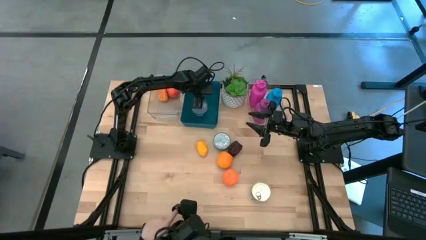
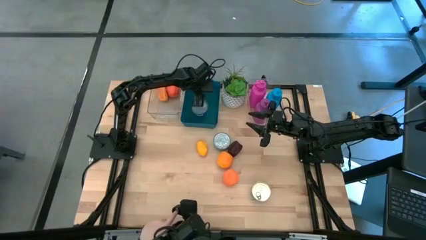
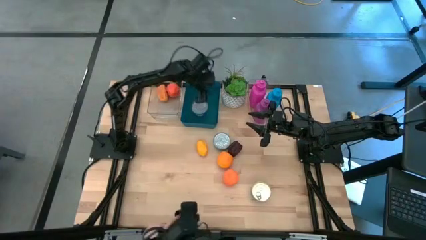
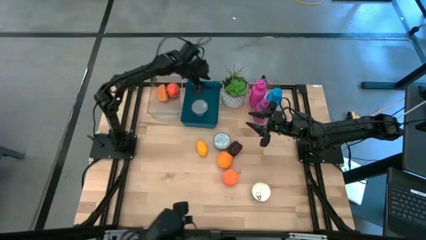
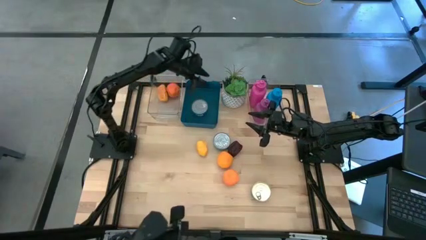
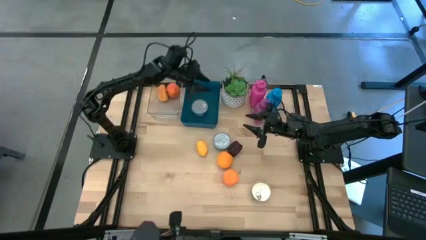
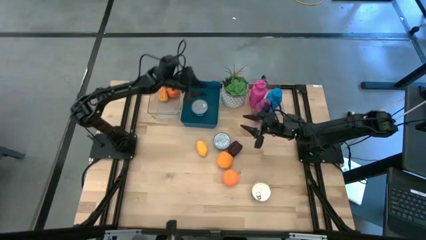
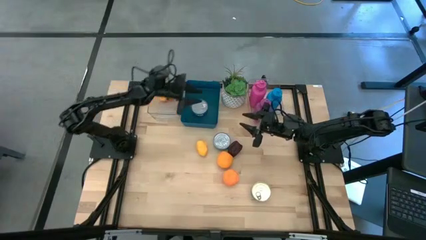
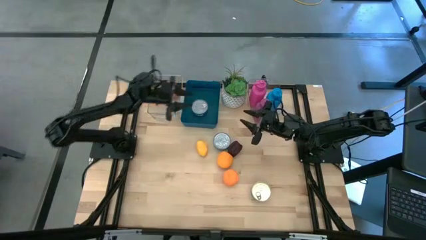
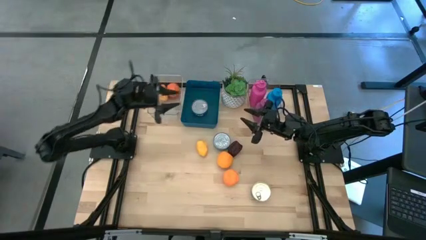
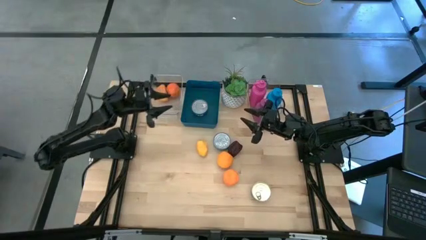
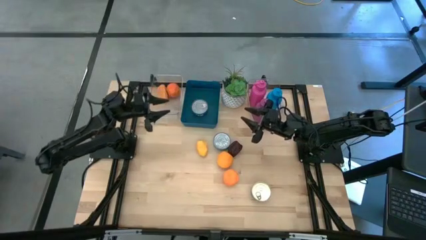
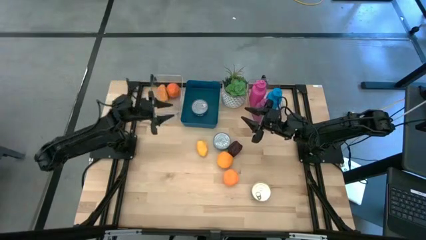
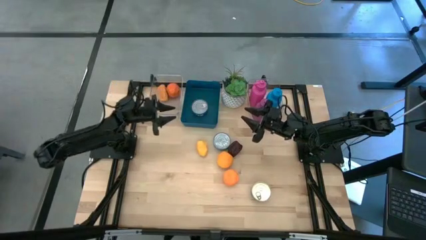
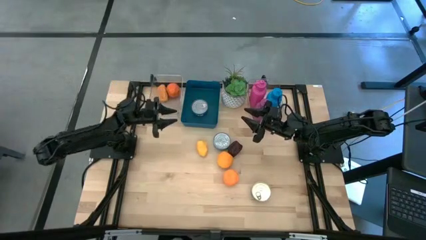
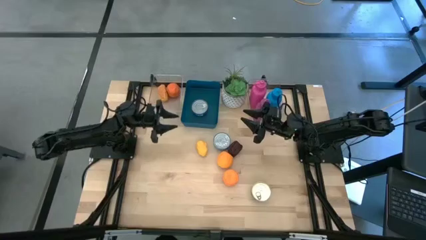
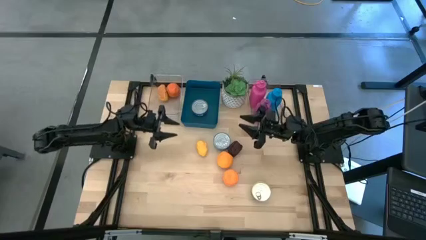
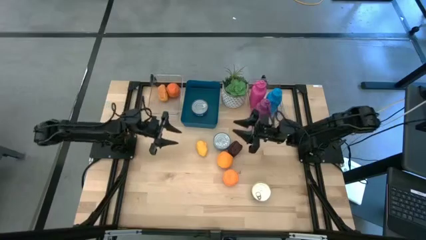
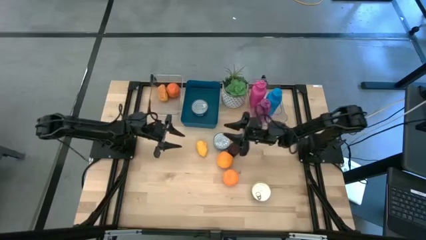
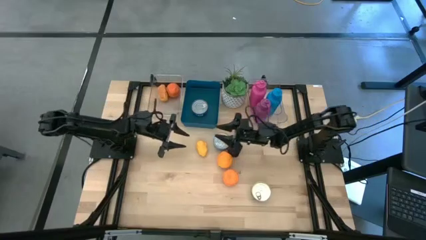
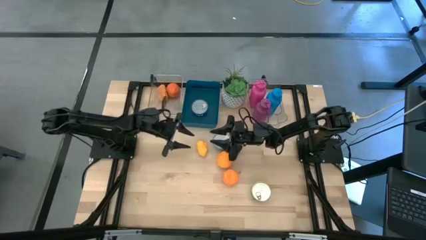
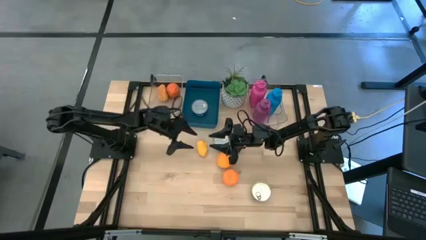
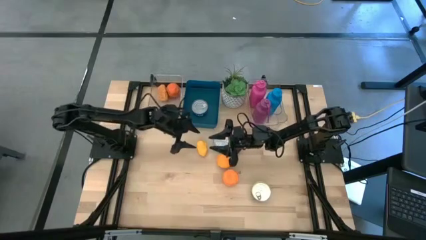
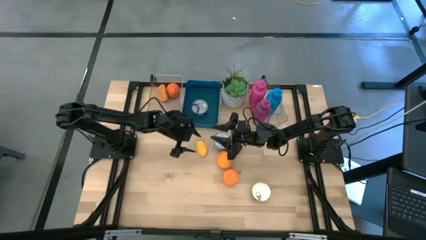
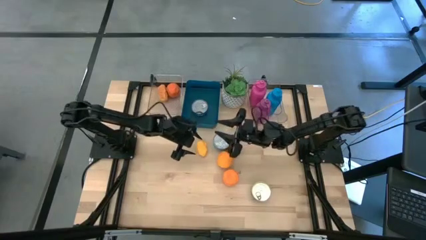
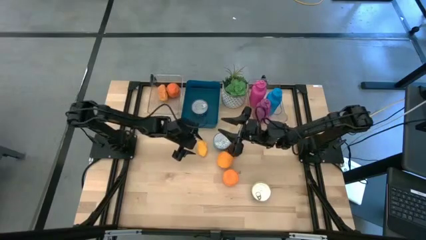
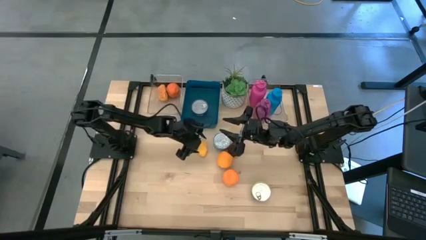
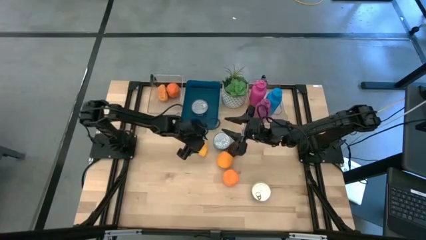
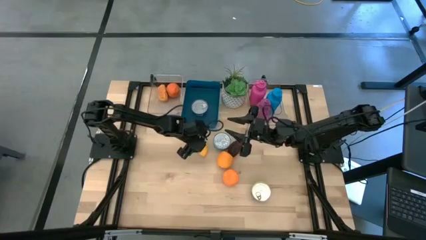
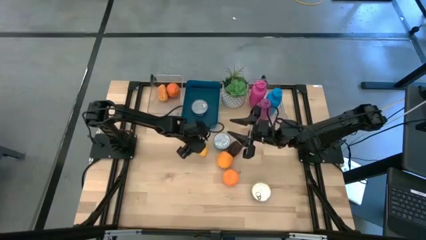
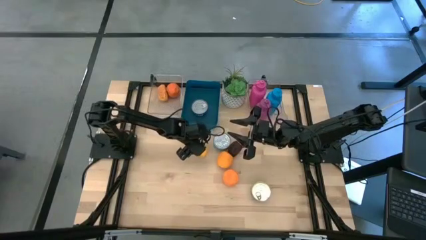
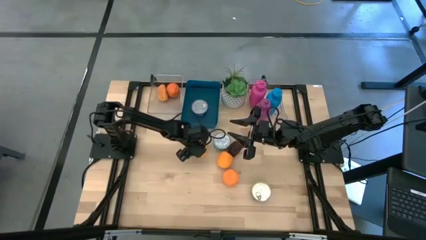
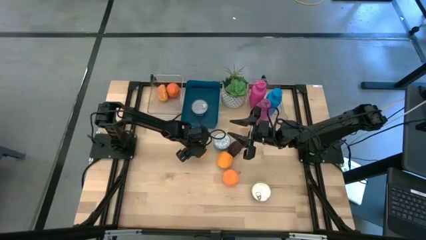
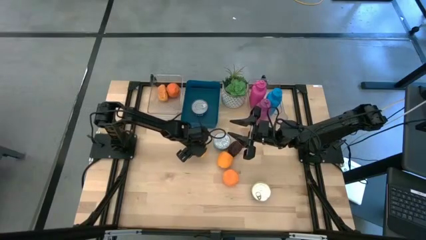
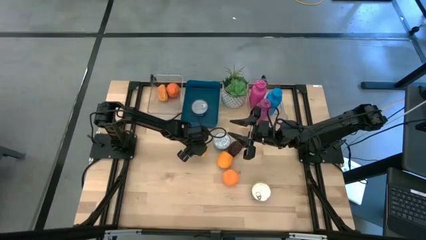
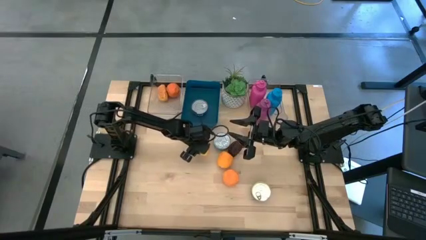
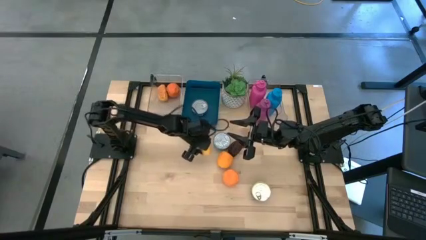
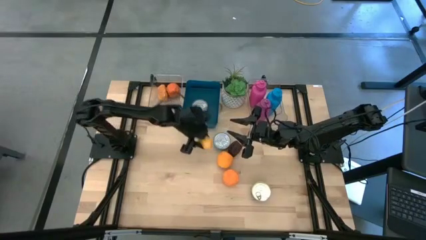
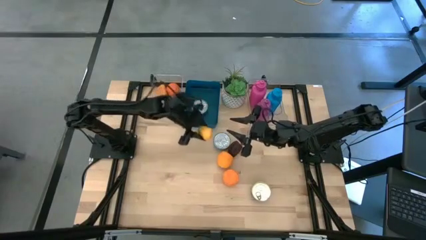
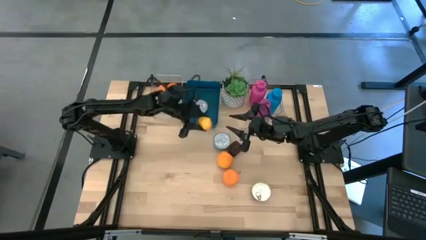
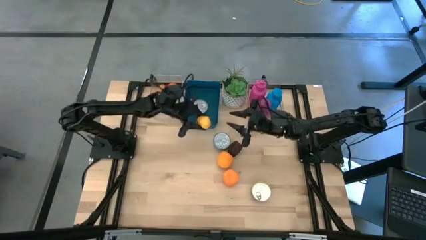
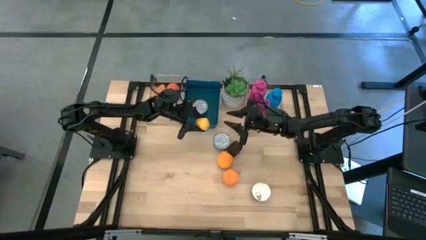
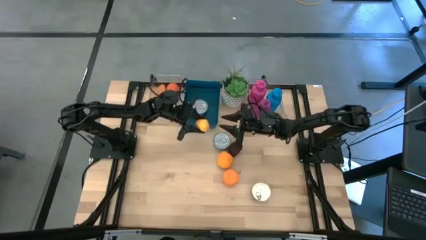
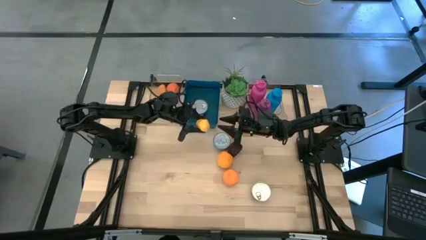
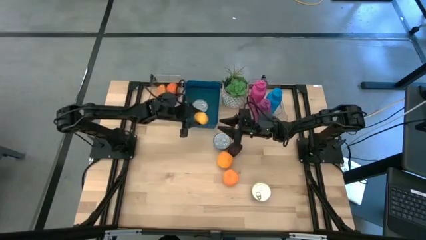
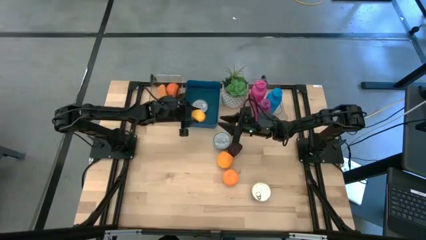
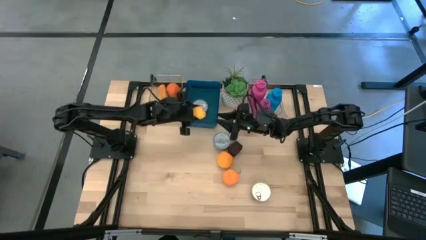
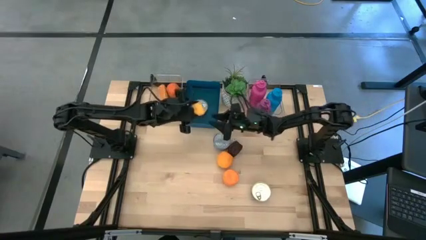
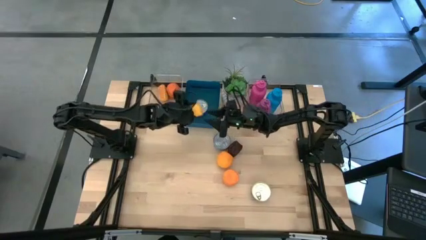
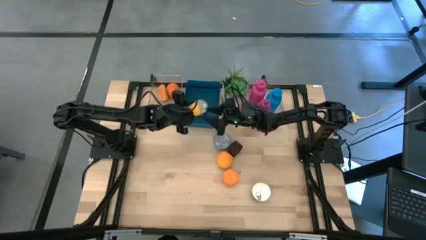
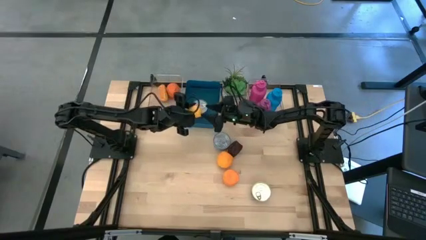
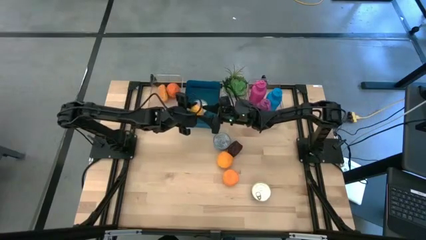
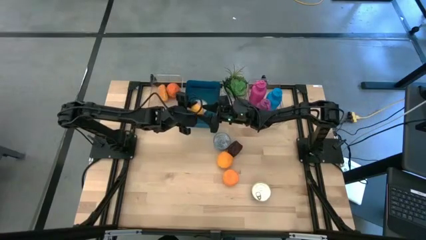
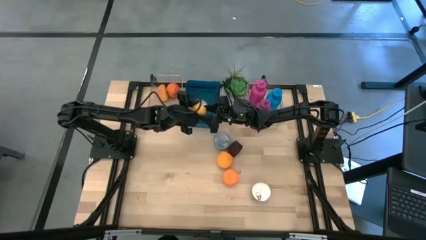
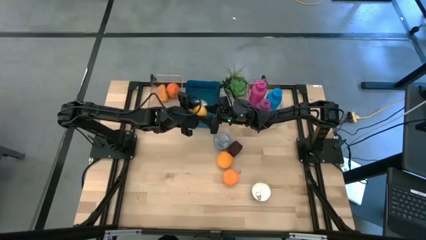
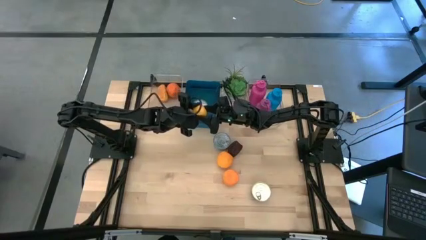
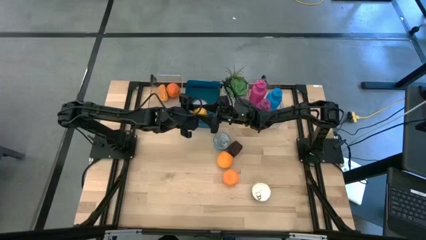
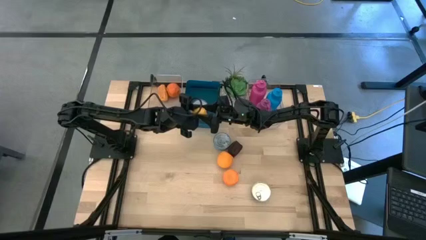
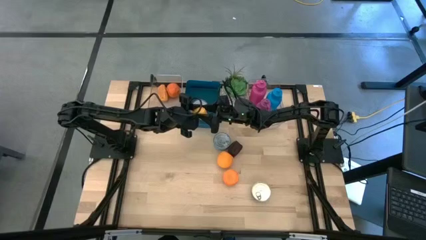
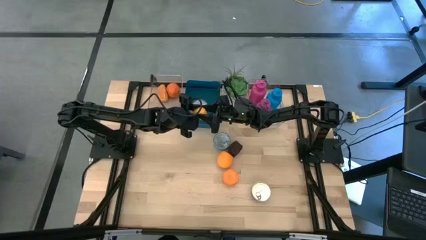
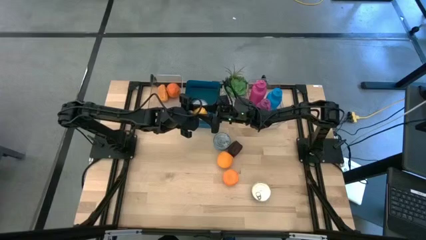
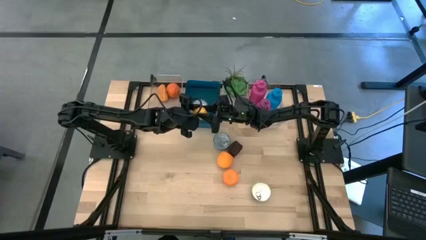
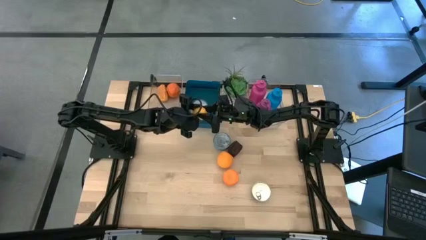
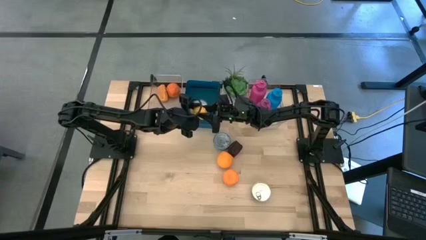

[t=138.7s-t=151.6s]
Task: Pick & Place Food Item
Put the lemon into the left transparent bin

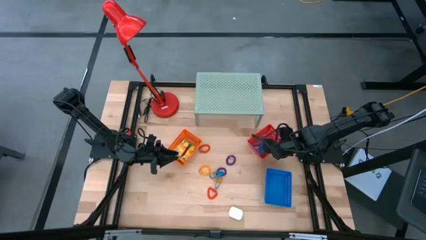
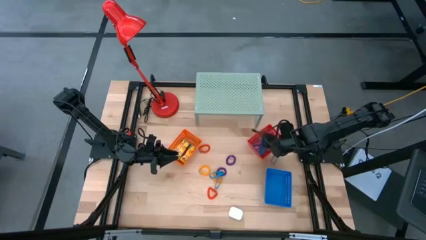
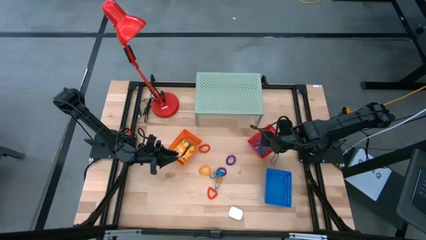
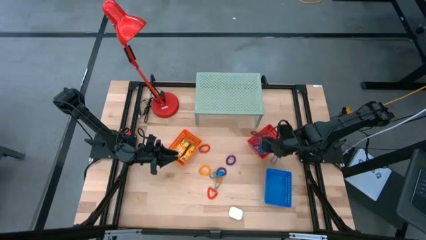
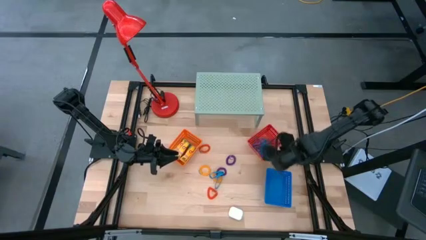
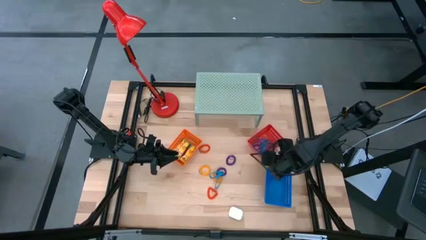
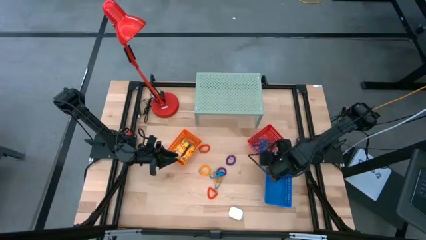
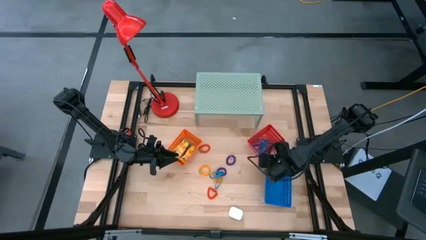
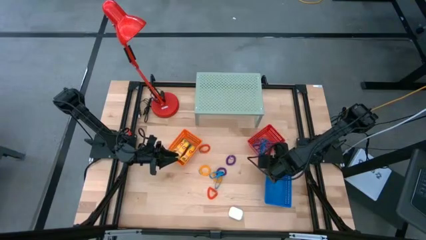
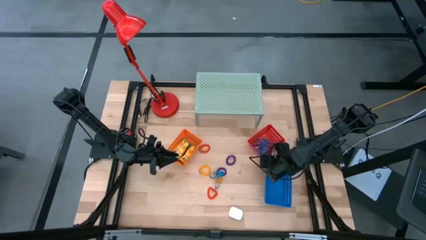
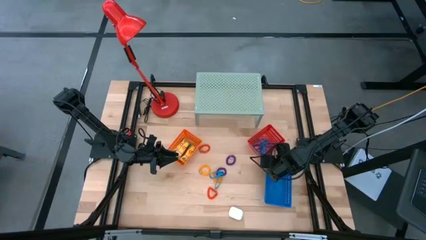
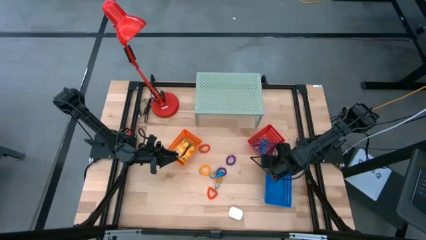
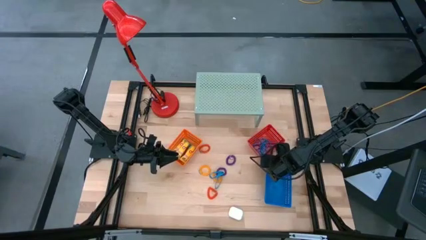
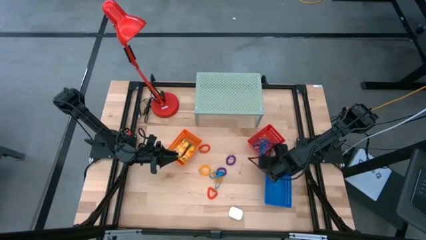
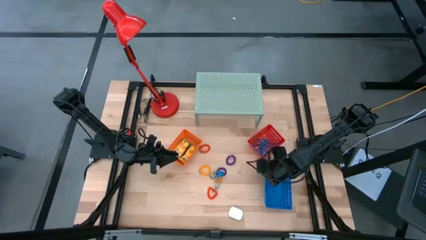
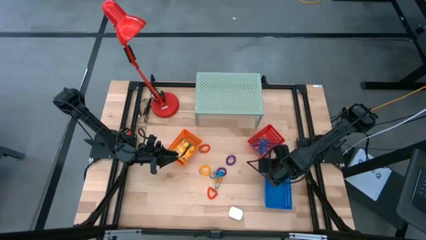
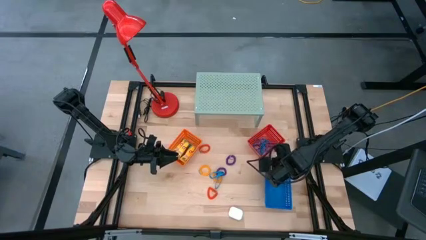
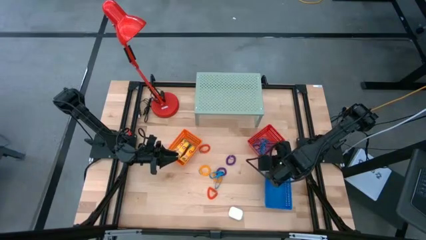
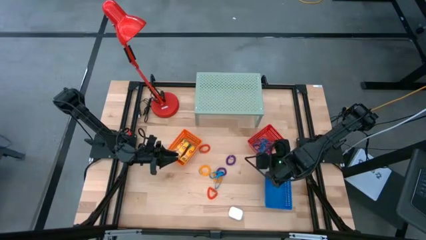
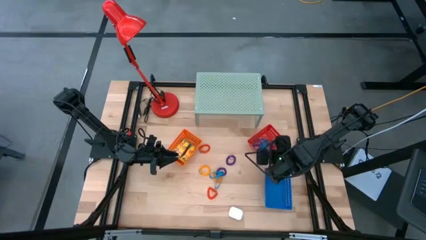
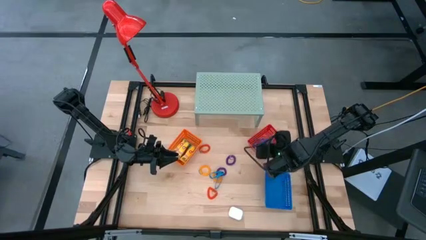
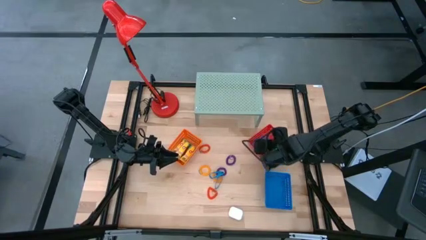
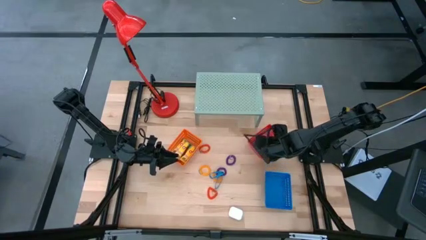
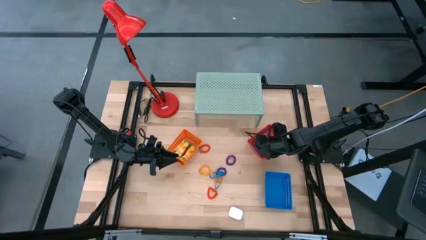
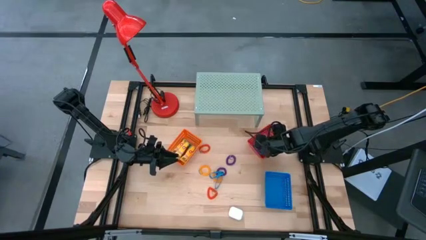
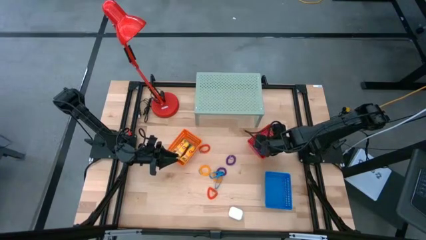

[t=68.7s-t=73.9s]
Task: Pick & Place Office Desk Supplies
Put the blue rubber band into the red bin
